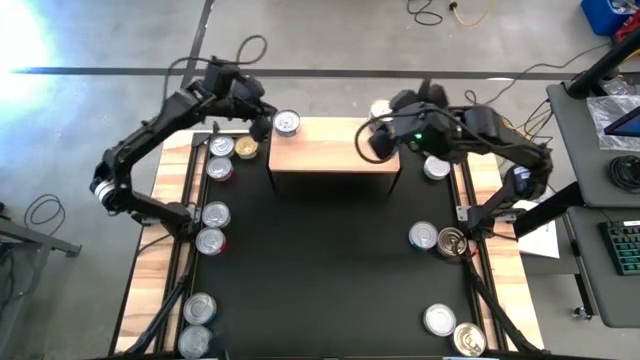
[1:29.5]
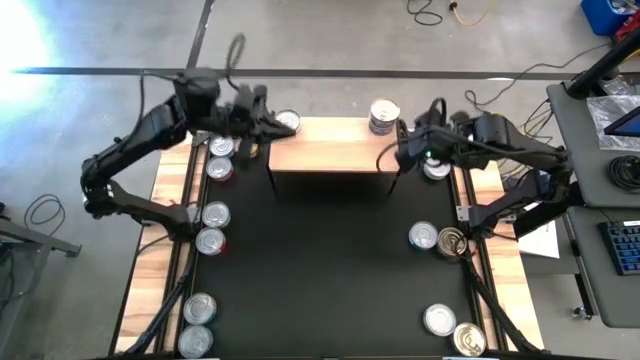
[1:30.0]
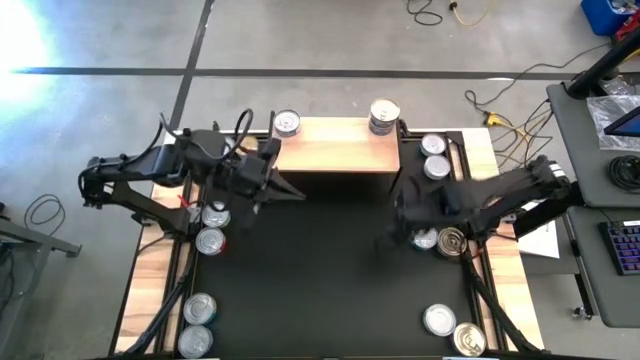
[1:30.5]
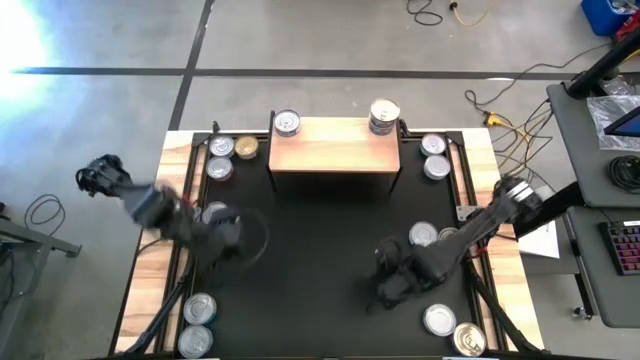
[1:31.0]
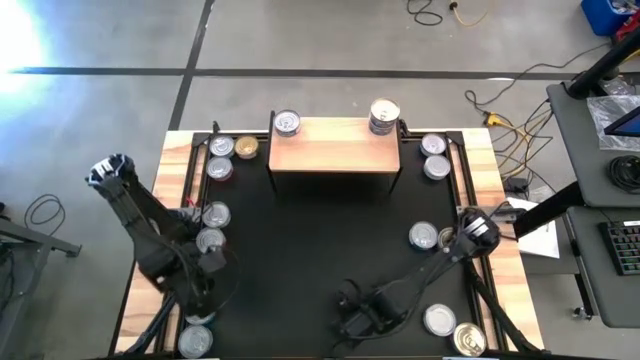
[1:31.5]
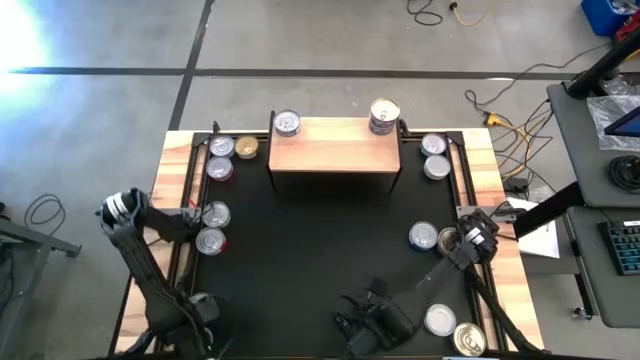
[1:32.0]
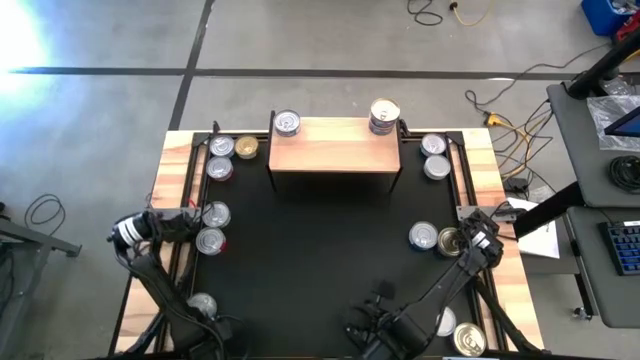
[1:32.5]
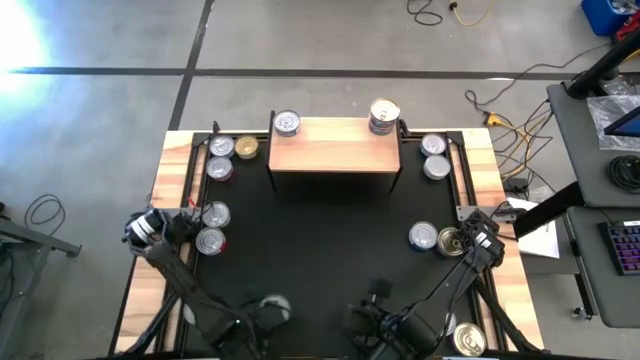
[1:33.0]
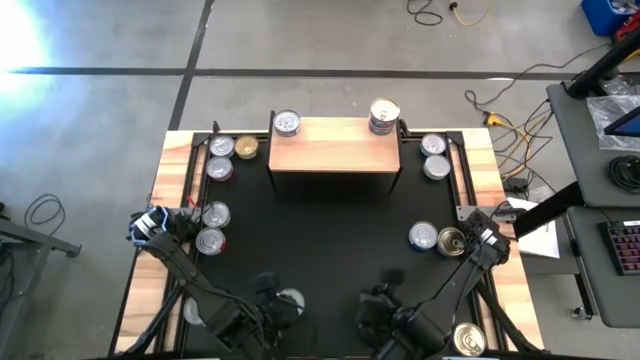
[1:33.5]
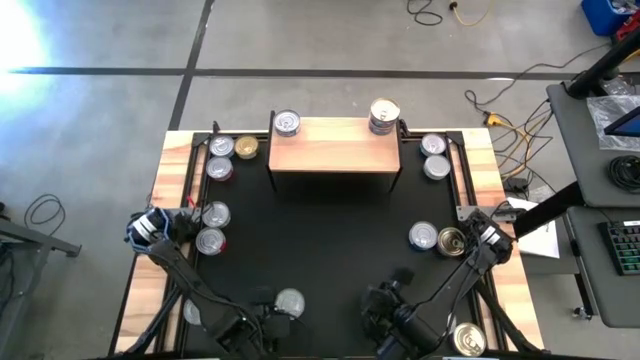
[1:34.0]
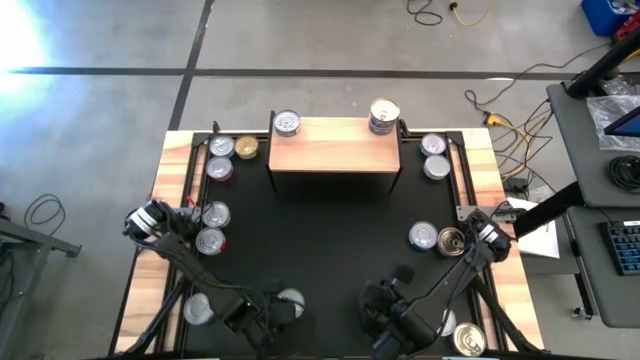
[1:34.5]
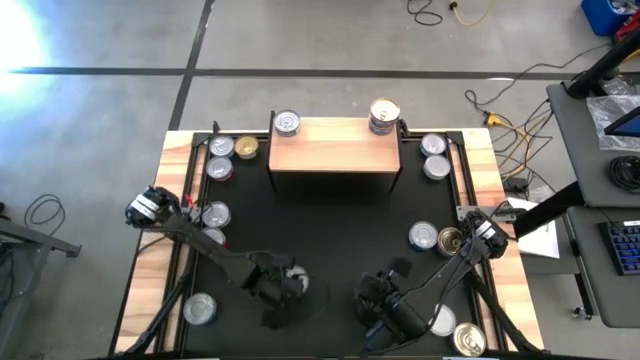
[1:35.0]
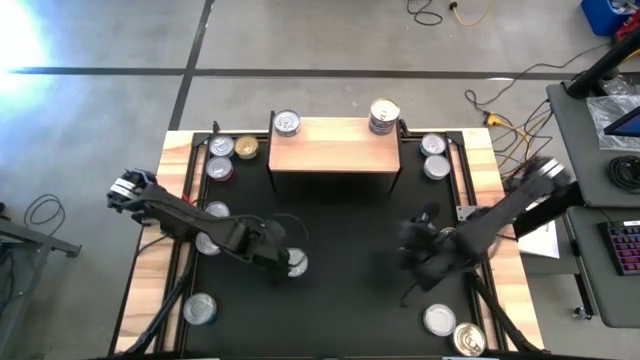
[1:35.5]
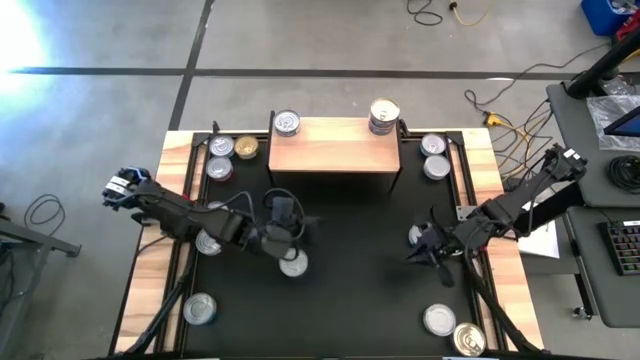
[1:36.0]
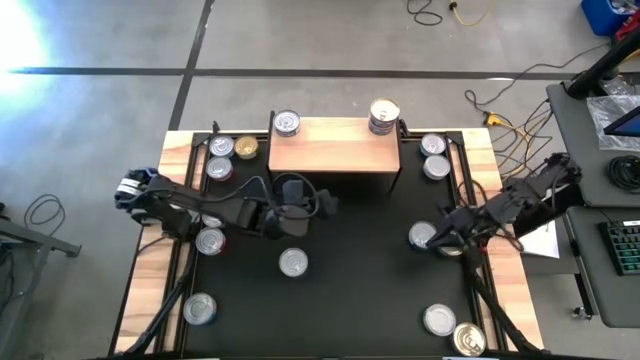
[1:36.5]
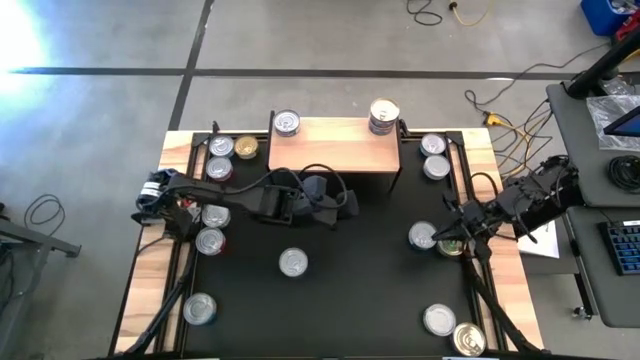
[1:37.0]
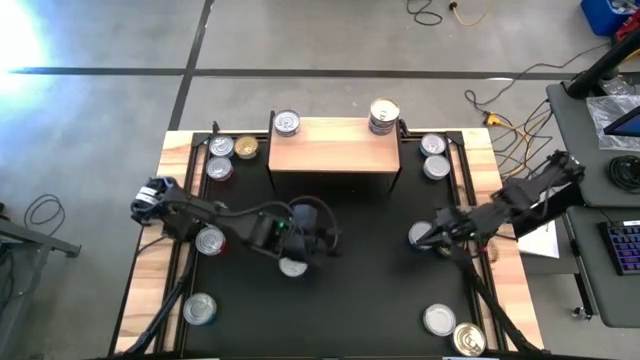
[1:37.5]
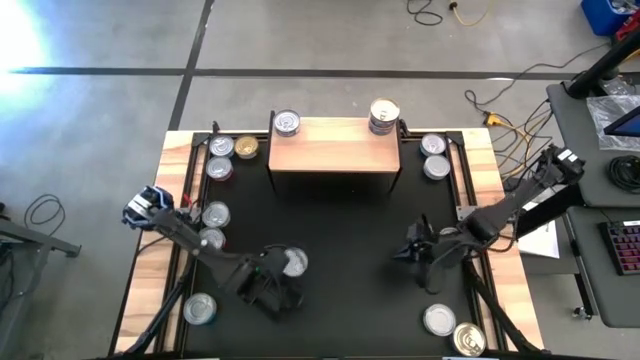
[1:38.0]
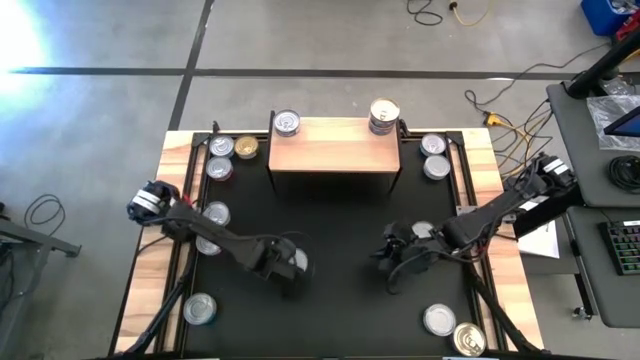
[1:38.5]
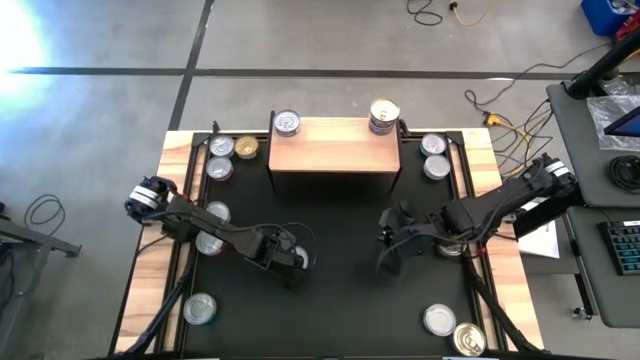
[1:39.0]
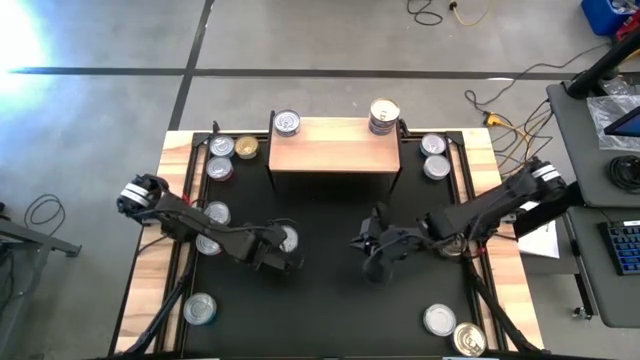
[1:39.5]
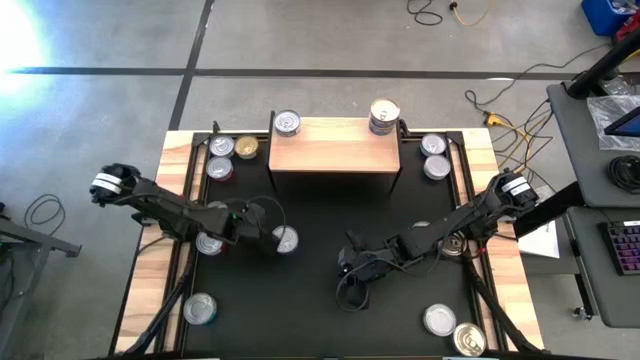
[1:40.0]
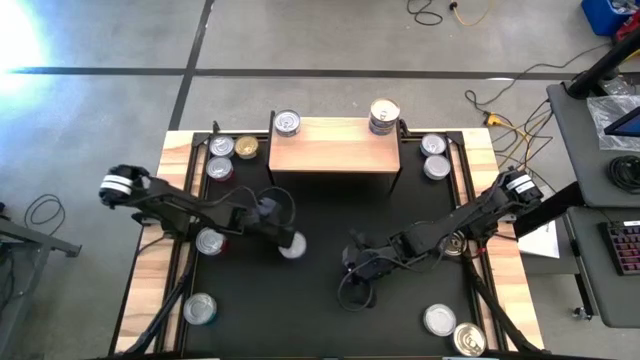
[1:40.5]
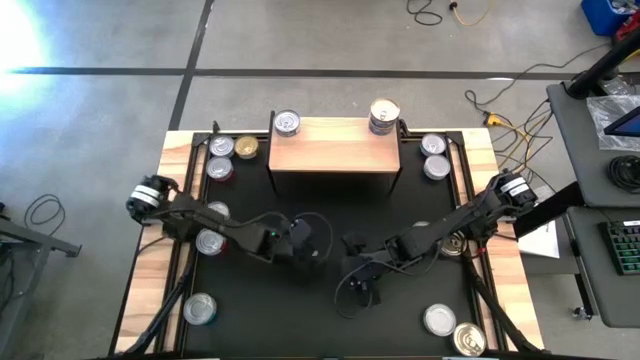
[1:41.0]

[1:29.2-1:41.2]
Task: Stack canned seafood by type on shelf
Stack the blue tuna can on top of the blue tuna can

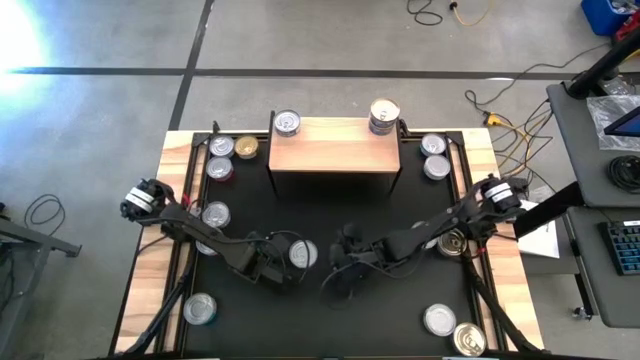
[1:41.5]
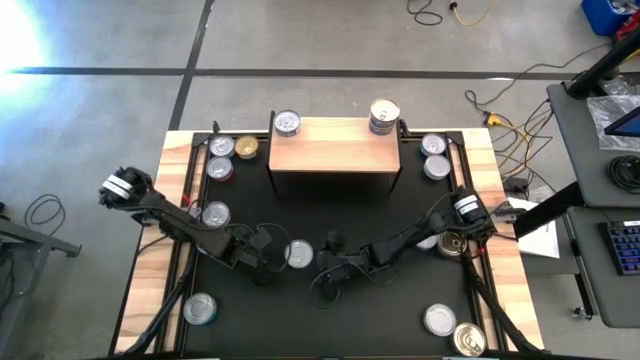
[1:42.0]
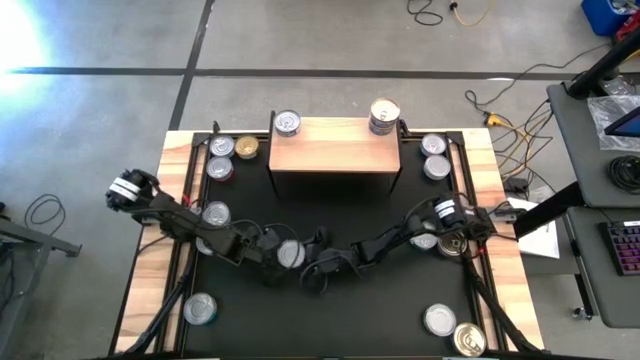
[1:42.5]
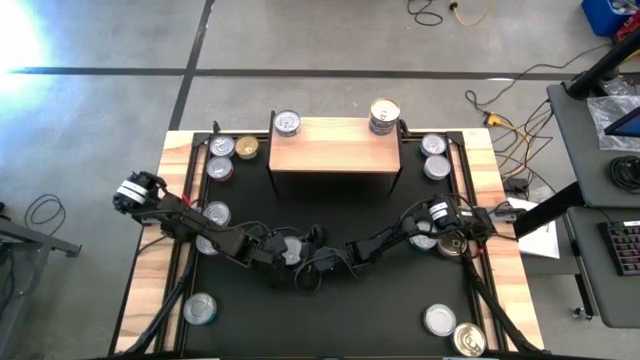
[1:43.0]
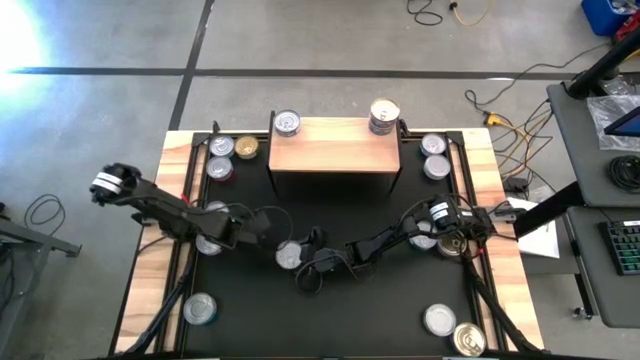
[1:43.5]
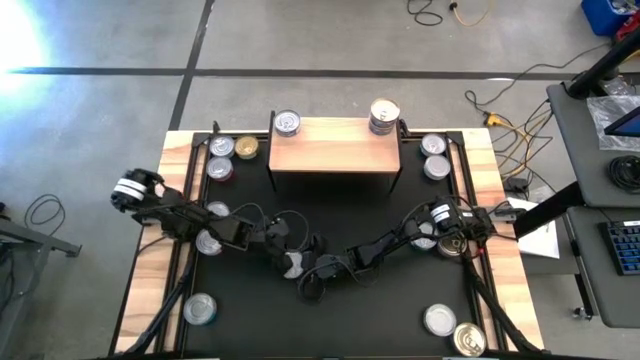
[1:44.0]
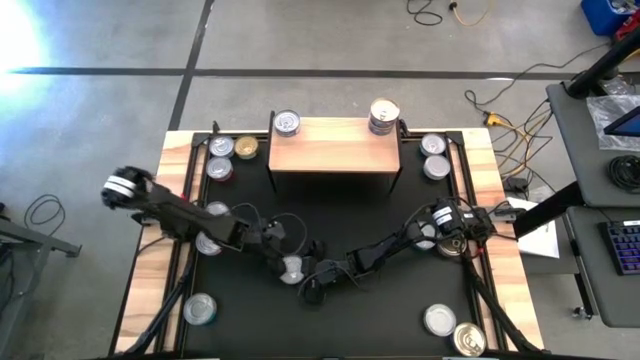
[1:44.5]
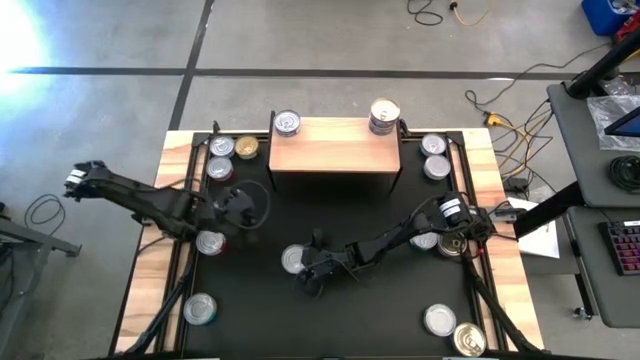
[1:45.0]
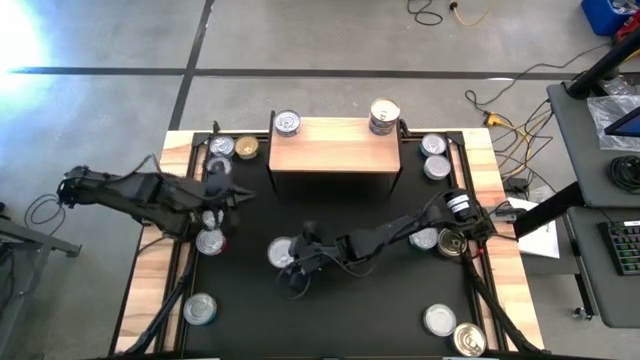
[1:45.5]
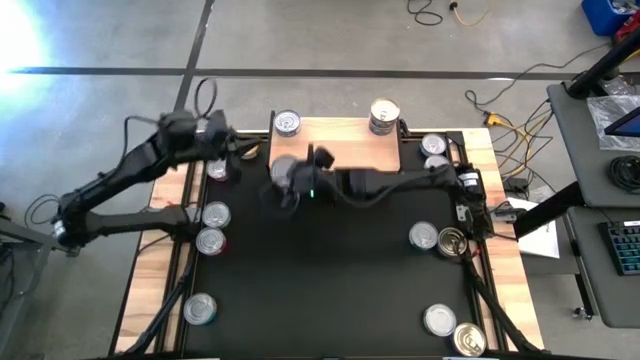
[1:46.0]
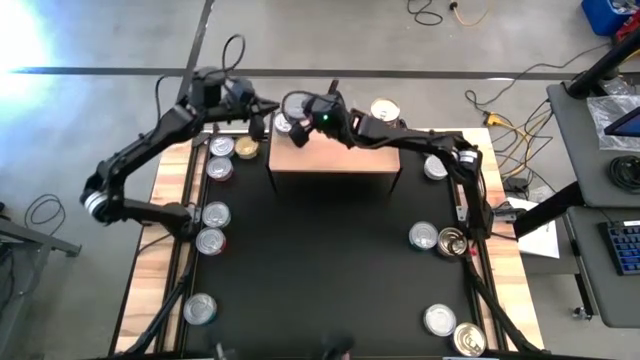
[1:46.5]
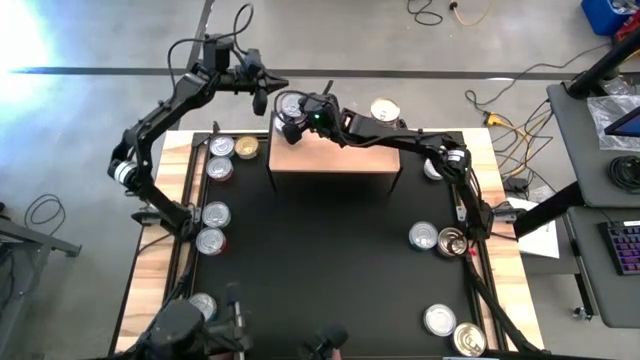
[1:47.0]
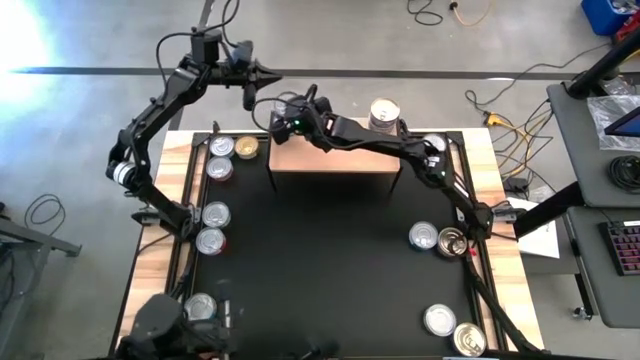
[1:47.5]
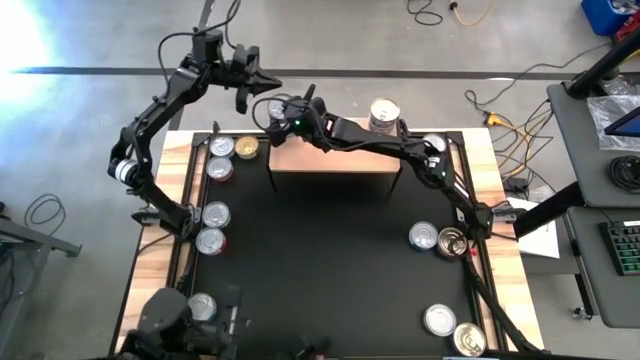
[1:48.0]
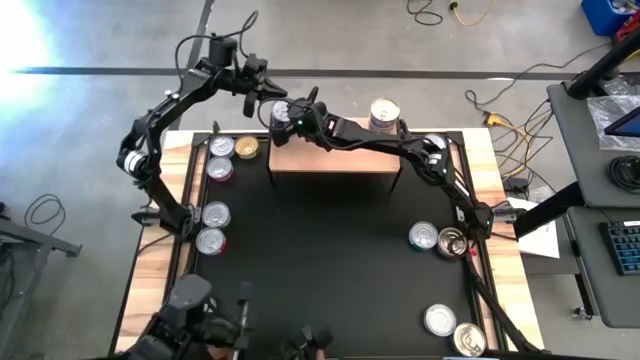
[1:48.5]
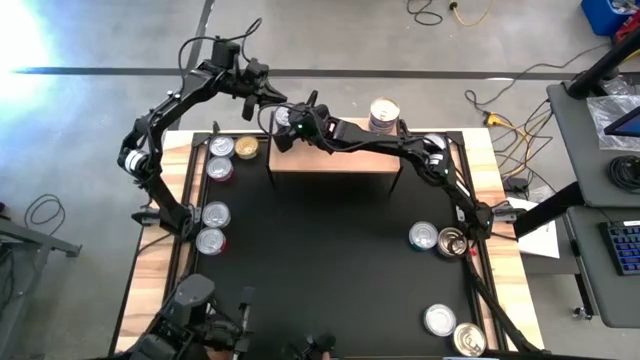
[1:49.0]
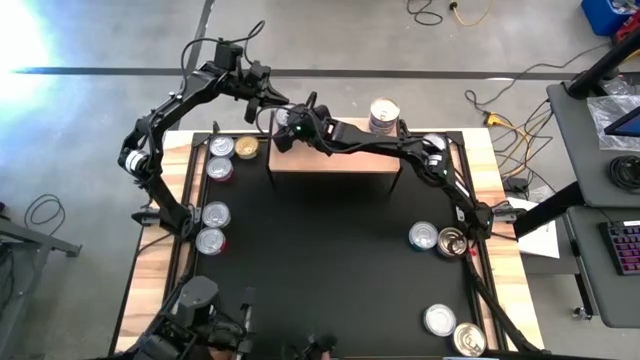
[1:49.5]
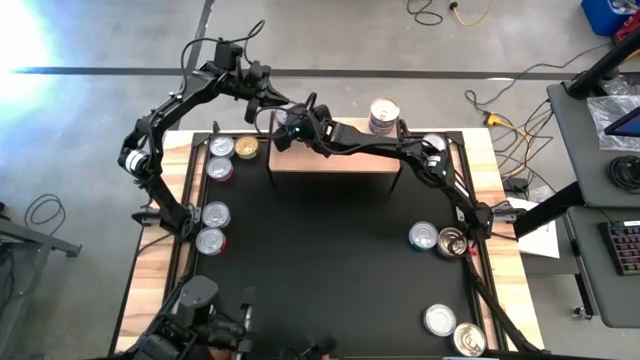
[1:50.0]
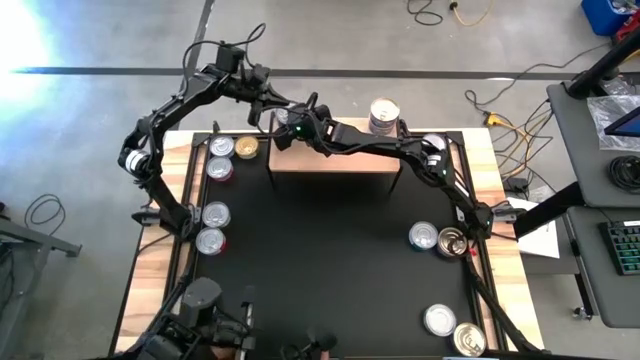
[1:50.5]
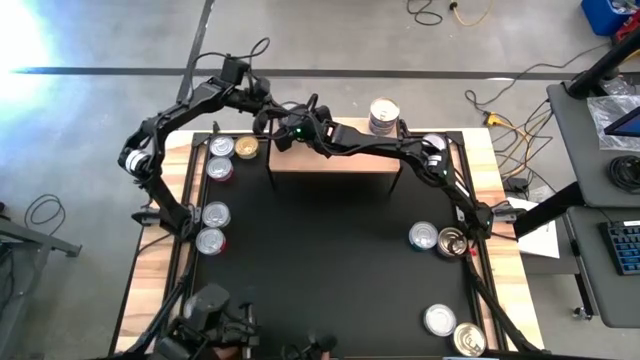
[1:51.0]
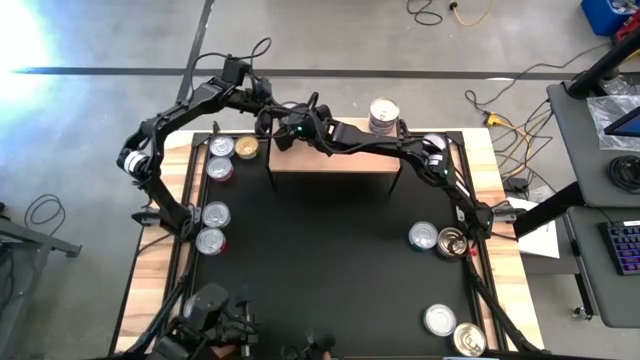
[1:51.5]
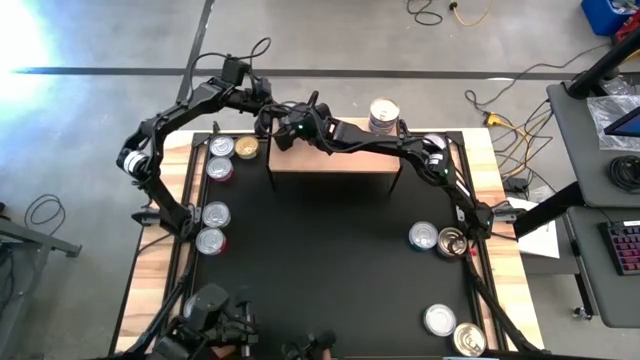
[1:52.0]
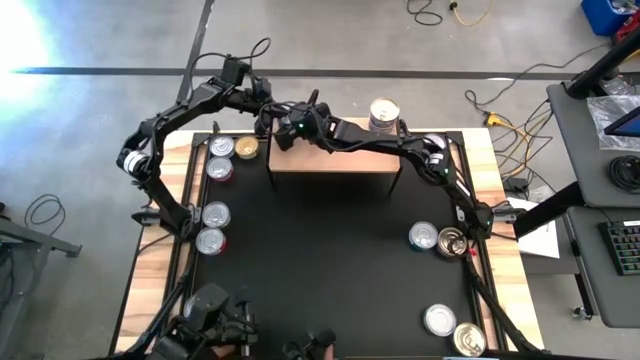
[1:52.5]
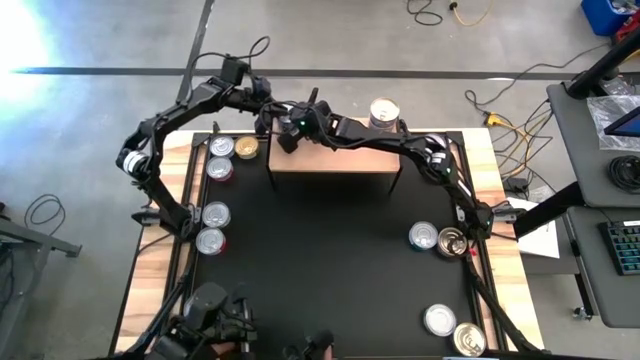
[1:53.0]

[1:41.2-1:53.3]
Stack the blue tuna can on top of the blue tuna can
